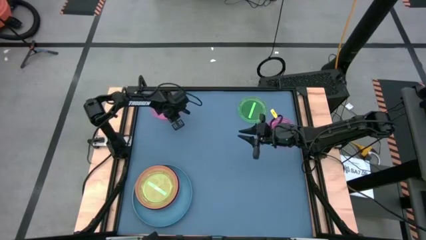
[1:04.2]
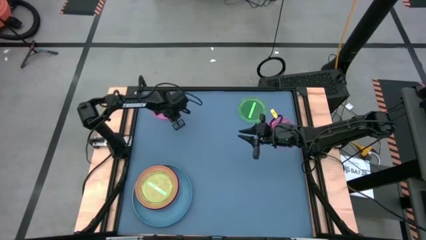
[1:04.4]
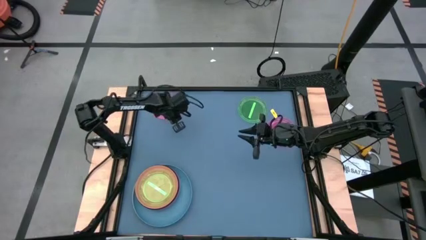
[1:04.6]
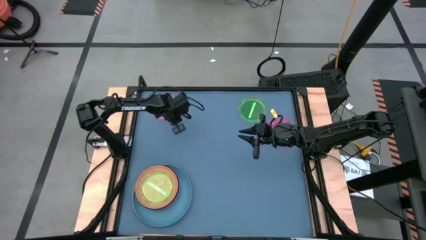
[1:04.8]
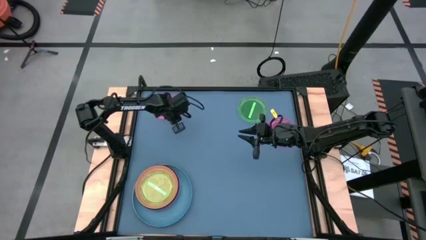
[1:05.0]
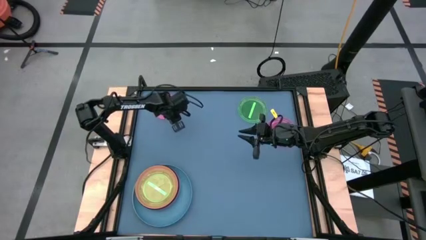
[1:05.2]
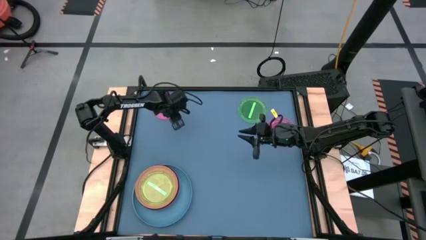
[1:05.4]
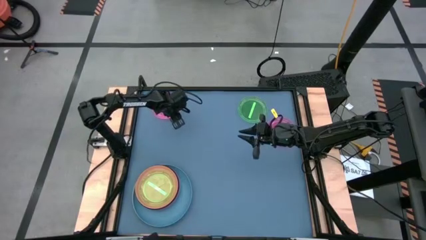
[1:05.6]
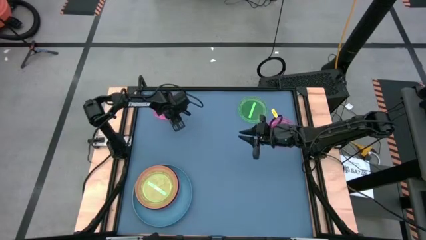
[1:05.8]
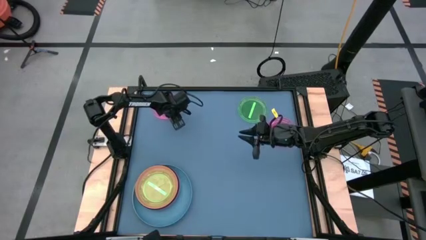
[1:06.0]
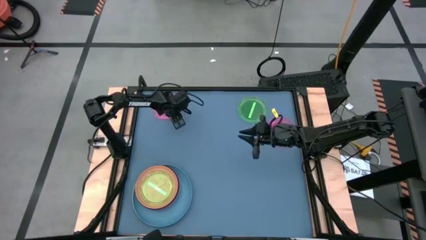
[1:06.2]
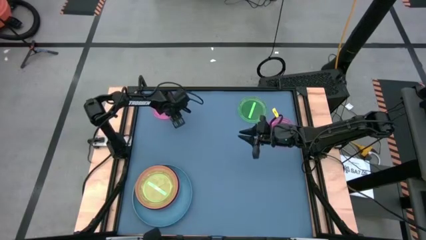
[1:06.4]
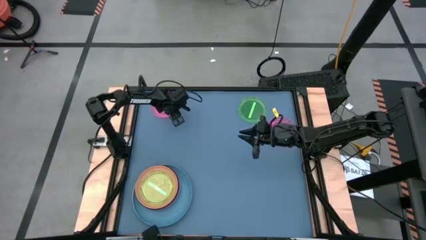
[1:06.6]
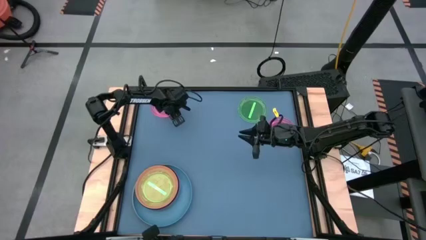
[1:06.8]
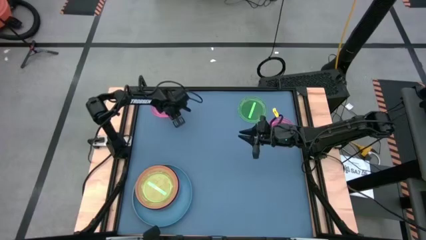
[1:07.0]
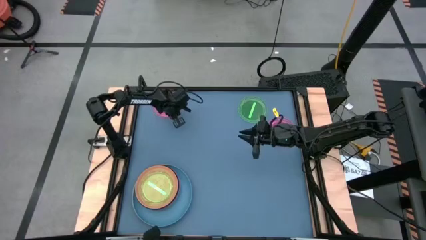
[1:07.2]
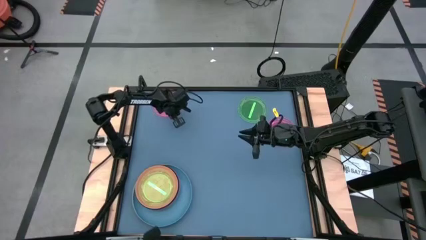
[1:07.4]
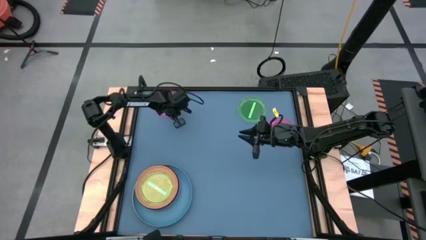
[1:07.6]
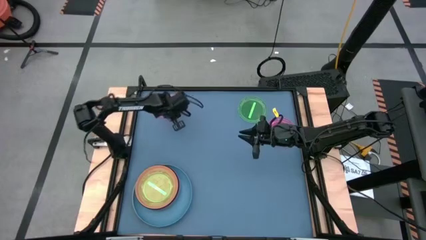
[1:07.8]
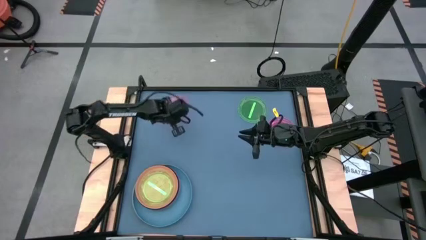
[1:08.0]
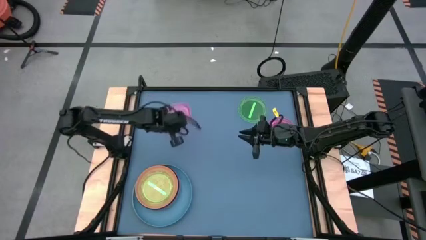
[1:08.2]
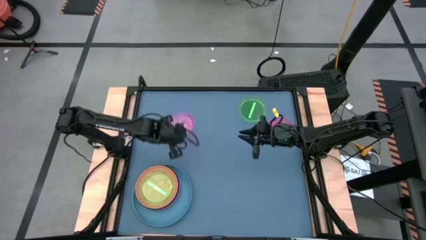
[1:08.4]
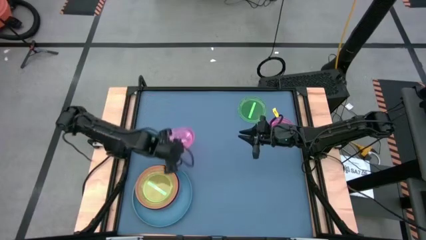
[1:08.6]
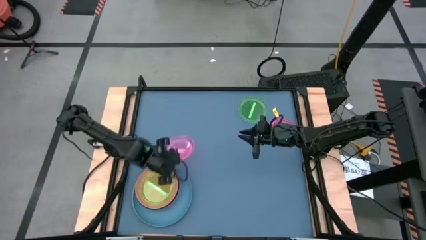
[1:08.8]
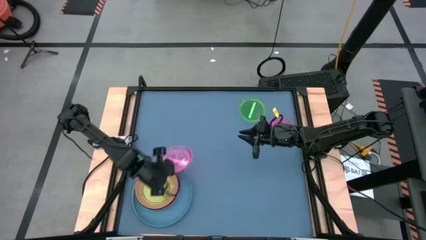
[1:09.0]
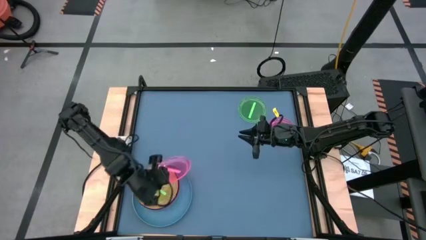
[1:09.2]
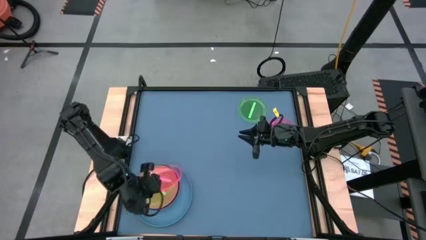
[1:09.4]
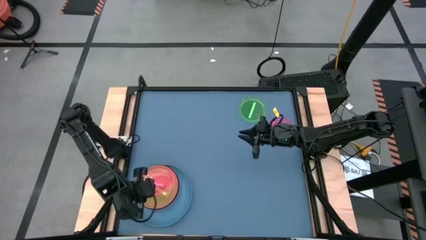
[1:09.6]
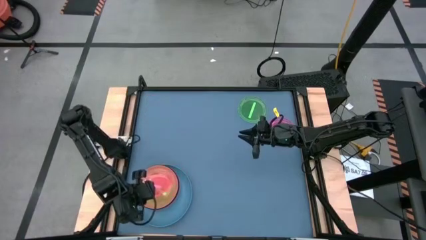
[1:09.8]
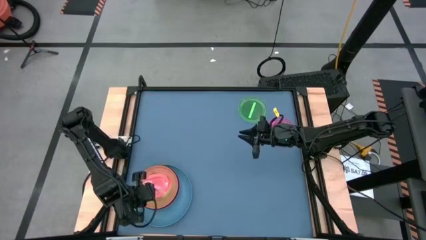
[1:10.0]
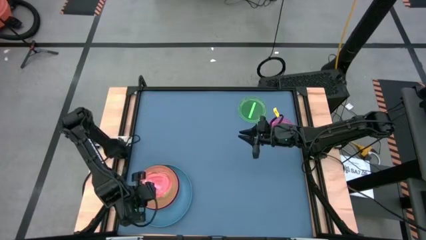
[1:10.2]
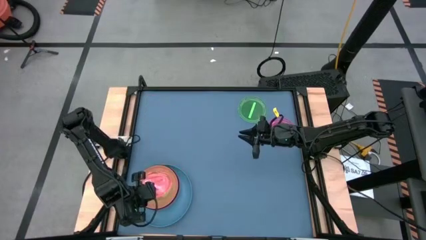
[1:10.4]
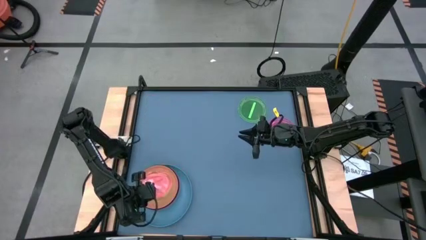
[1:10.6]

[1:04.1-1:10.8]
Task: Stack plastic plates
Stack the left pink plate on top of the green plate

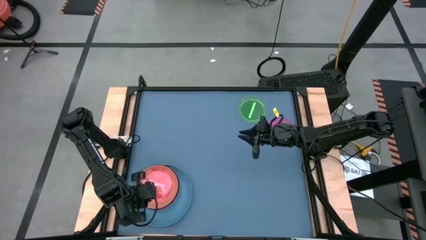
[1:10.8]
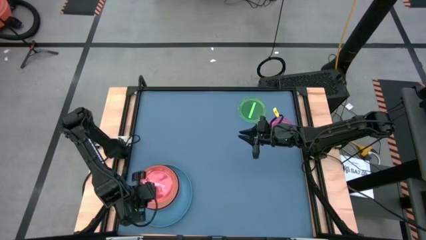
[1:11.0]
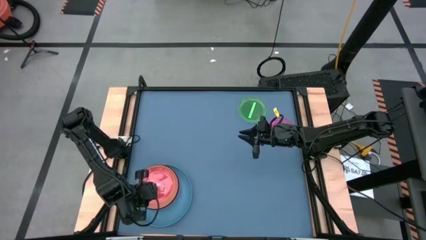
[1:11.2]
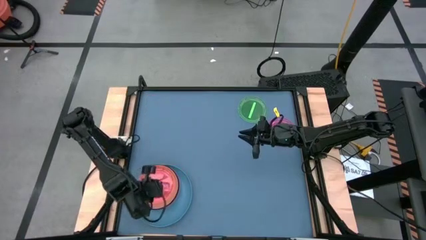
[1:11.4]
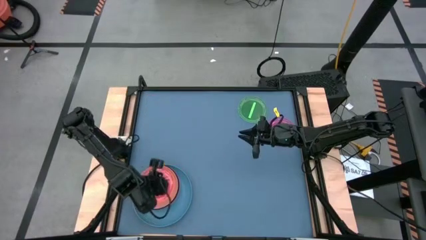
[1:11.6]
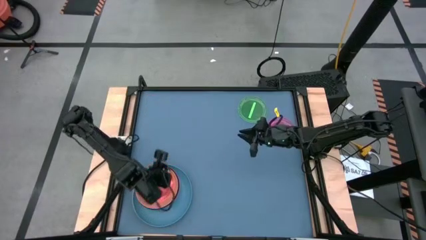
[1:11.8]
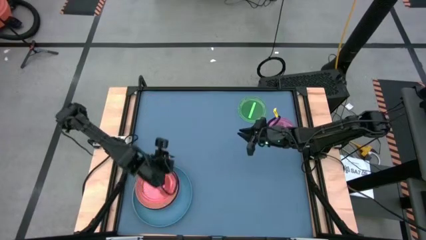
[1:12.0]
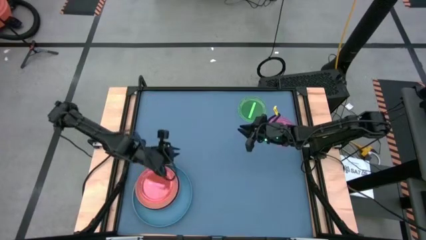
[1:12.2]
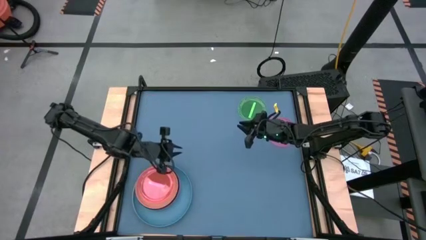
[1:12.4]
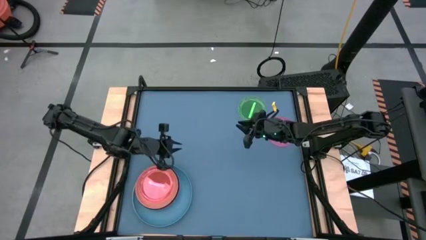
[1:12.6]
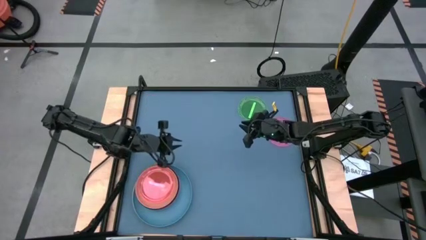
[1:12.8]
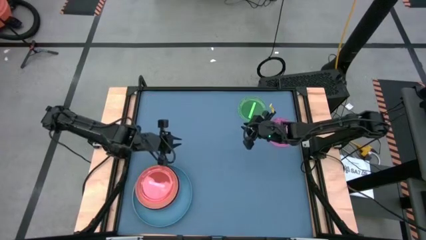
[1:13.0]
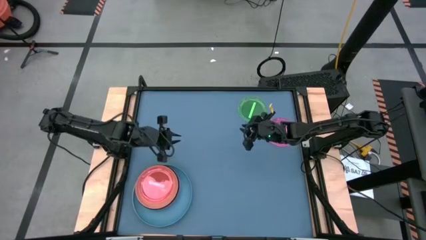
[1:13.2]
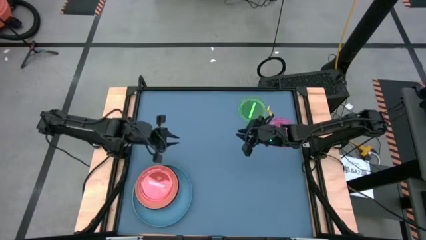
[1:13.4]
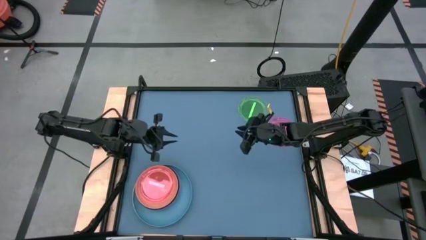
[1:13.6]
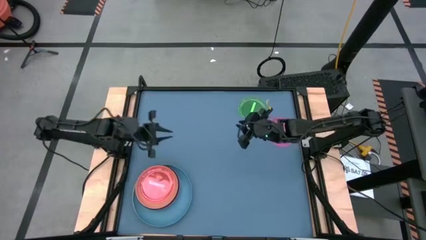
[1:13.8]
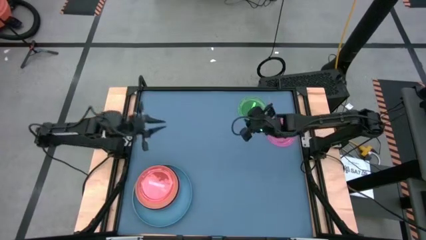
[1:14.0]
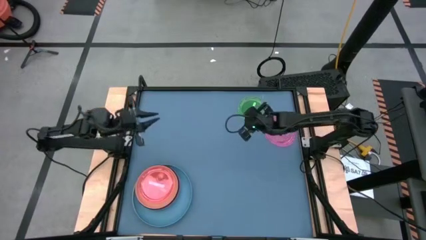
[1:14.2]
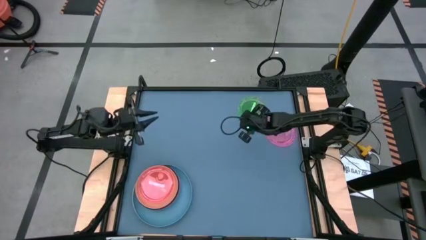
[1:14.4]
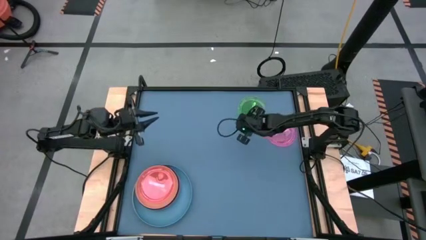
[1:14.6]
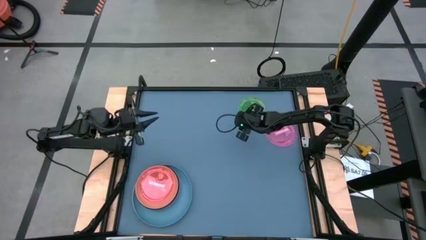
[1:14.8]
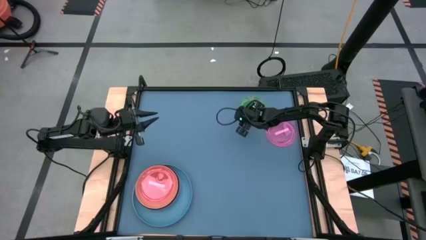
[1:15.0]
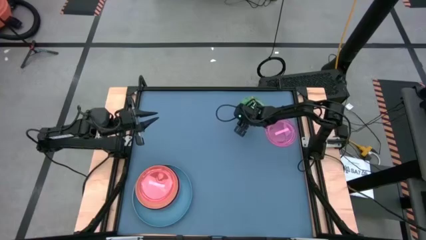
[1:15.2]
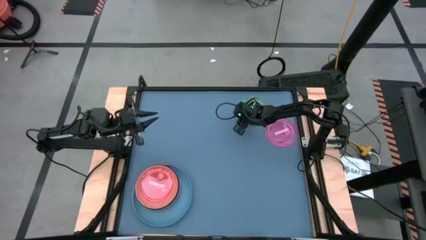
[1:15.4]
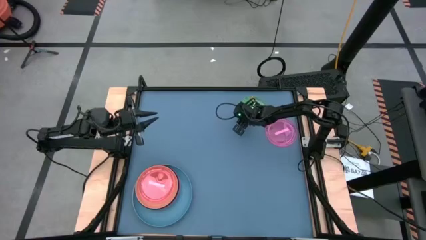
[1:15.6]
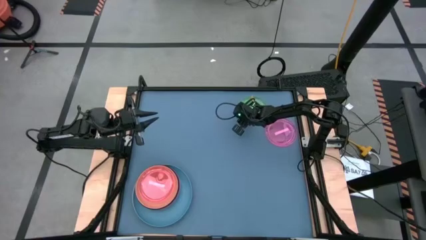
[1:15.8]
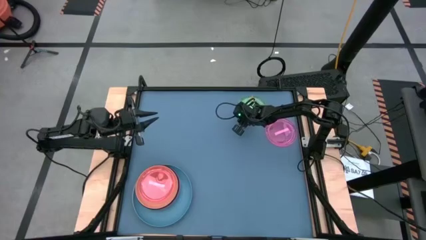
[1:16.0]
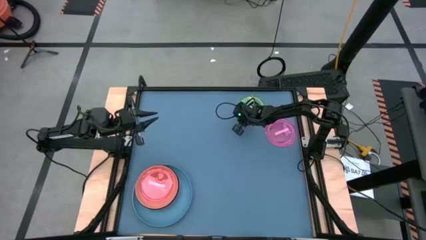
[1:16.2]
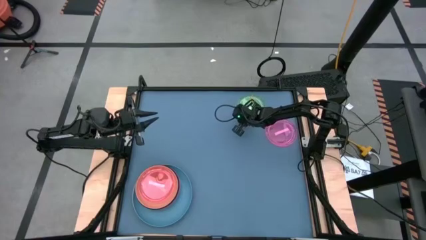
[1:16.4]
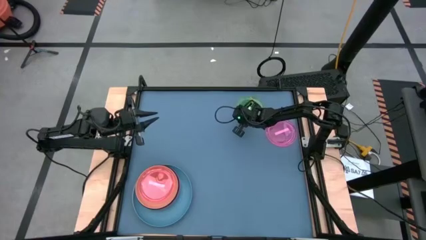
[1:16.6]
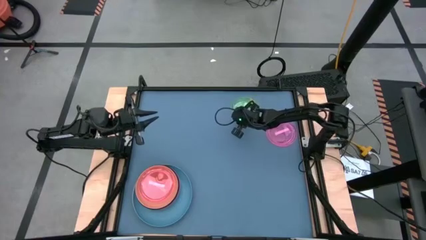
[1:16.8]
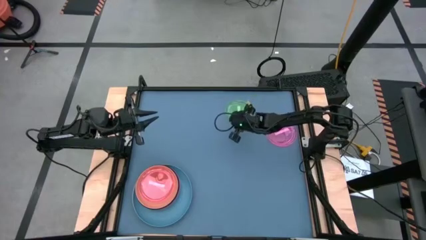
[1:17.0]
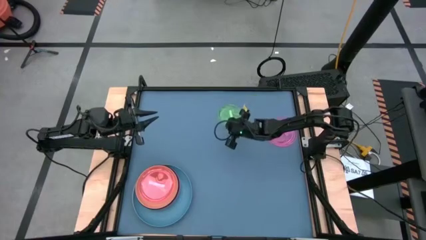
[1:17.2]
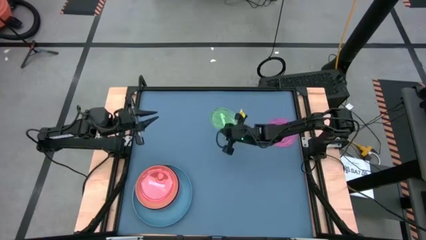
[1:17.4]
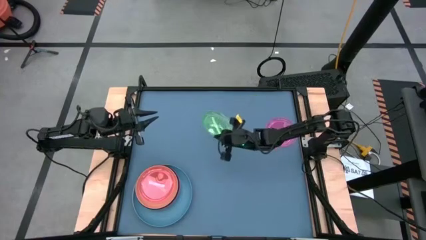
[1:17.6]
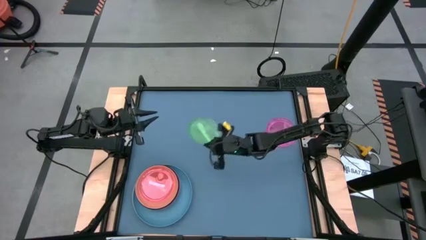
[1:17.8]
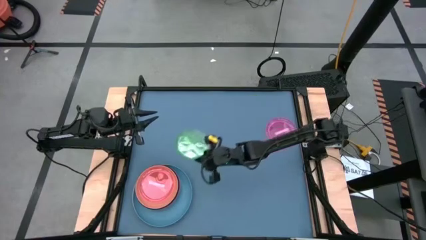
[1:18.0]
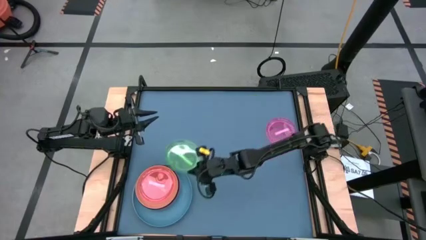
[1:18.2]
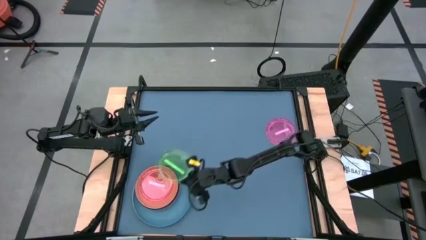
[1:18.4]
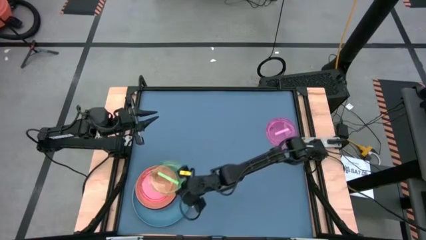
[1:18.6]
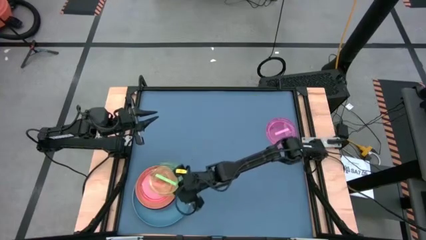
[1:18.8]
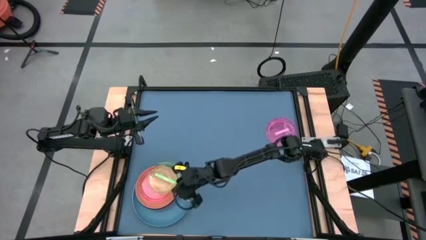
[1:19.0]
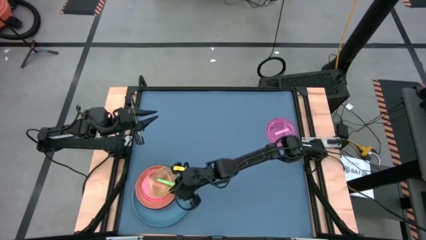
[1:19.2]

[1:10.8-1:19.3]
Stack the green plate on top of the pink transparent plate

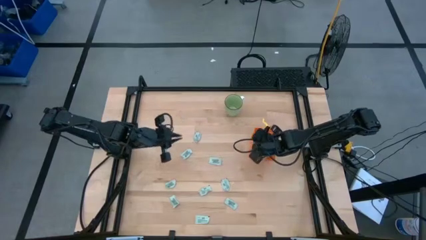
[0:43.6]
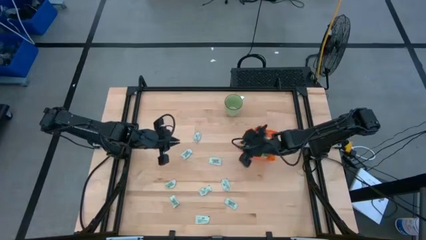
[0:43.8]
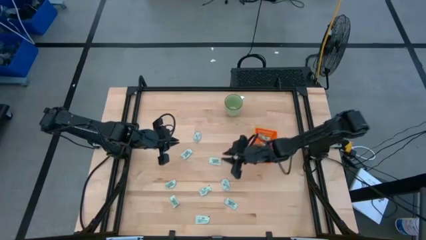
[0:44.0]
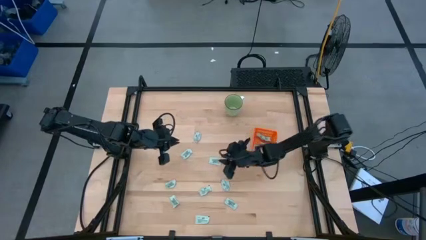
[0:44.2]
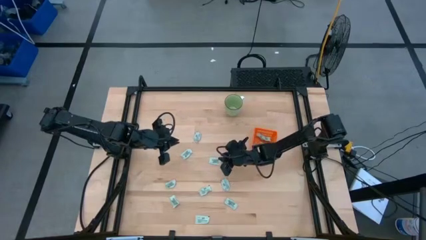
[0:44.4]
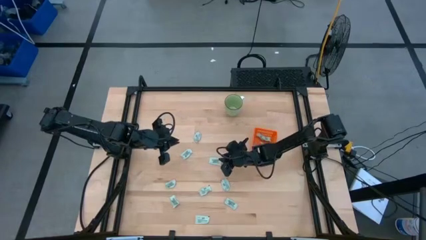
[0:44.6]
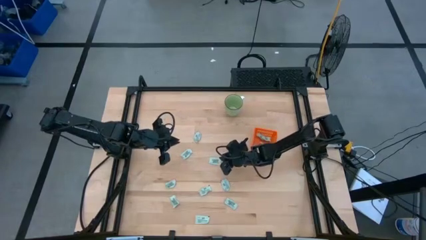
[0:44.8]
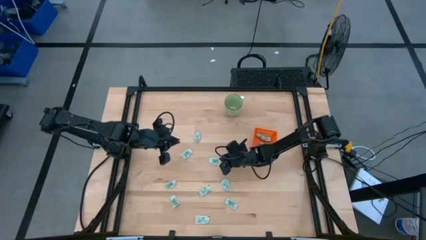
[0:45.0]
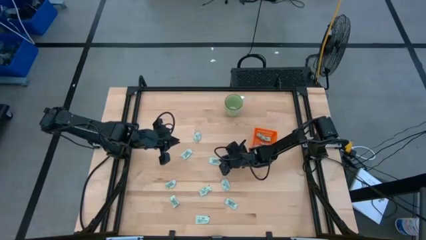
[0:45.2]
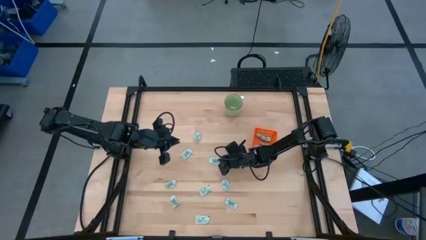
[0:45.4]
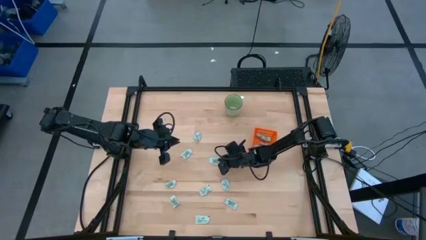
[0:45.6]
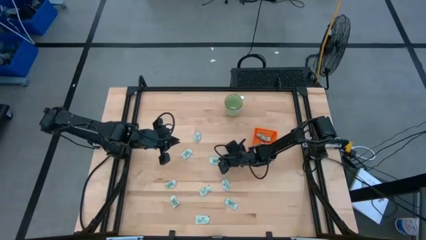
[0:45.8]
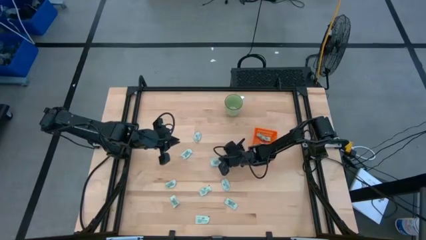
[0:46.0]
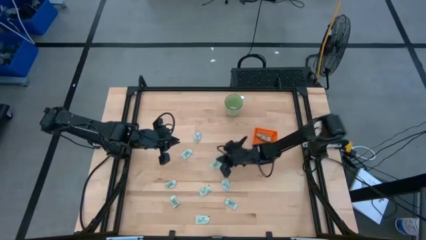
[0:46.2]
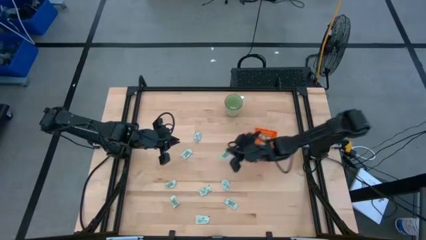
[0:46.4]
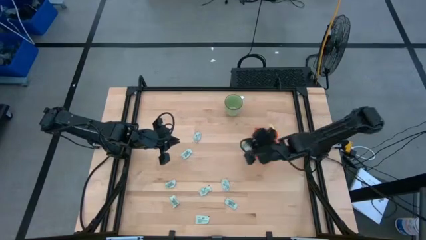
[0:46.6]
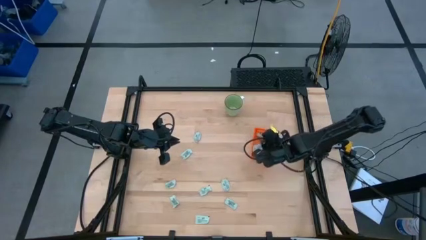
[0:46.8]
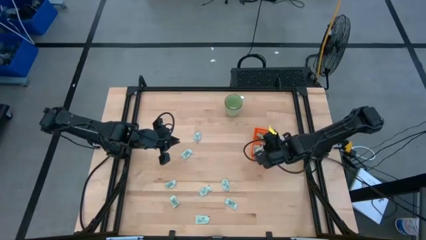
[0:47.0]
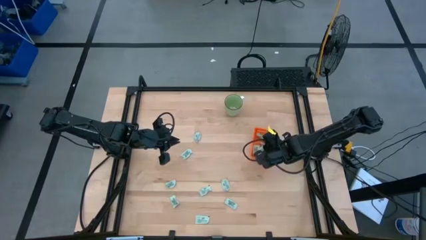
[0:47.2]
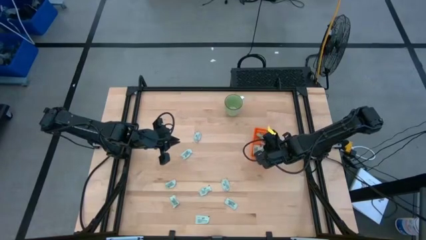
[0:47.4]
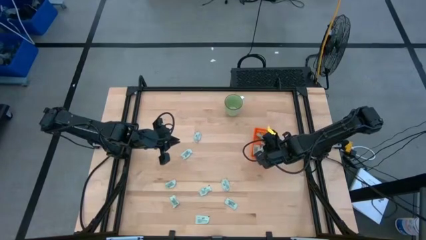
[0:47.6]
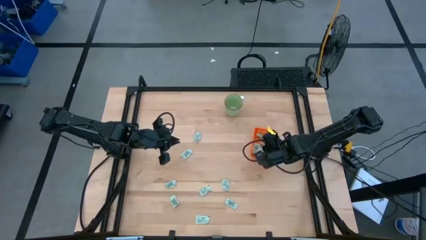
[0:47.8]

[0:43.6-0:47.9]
Task: Pick and place Stevia / Truvia into bins
Put the light green packet into the orange basket
